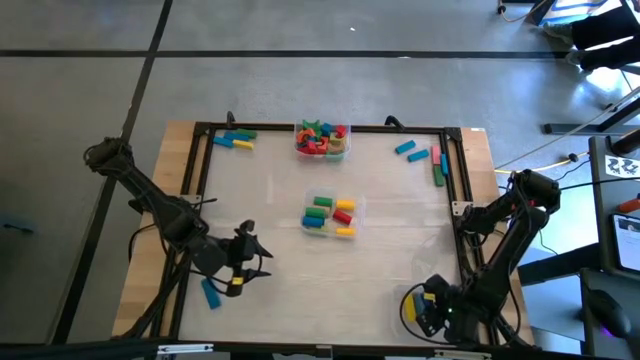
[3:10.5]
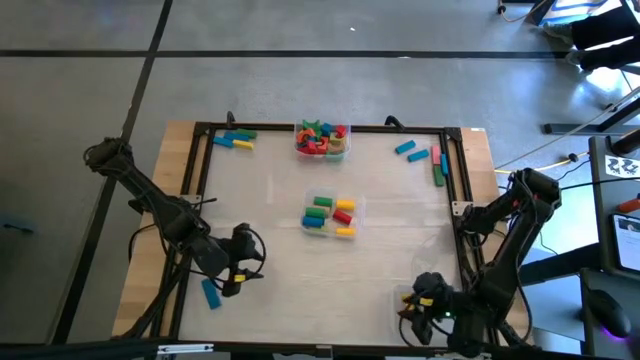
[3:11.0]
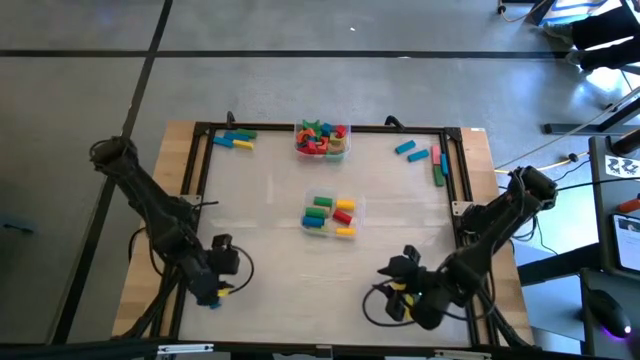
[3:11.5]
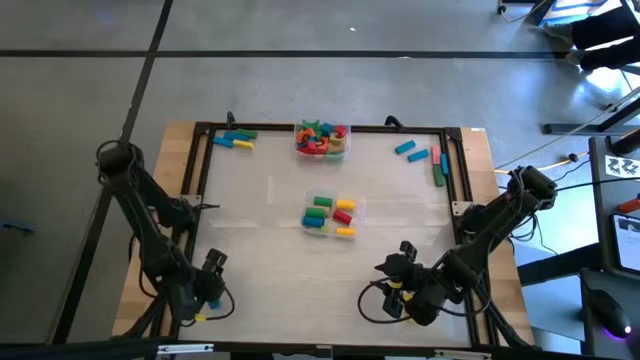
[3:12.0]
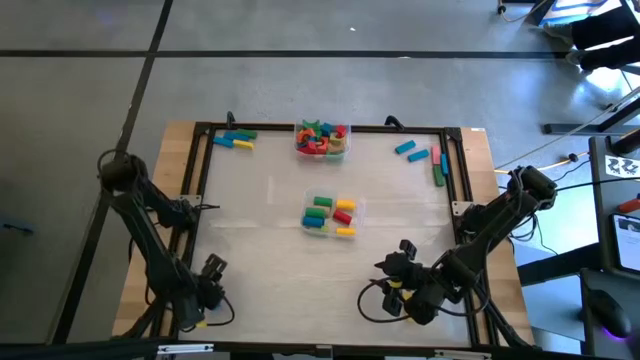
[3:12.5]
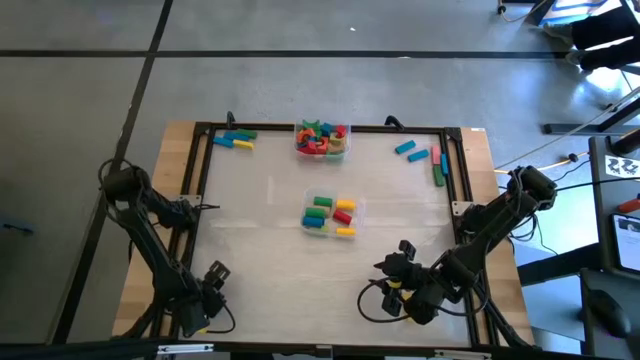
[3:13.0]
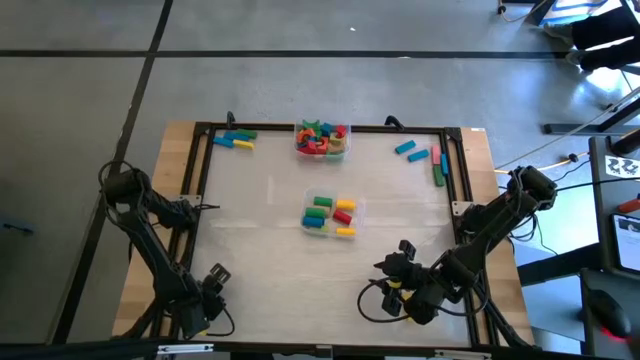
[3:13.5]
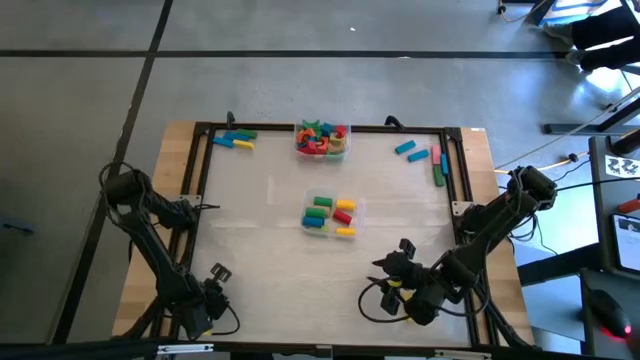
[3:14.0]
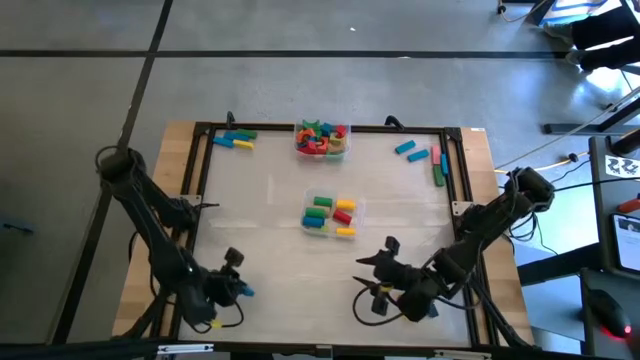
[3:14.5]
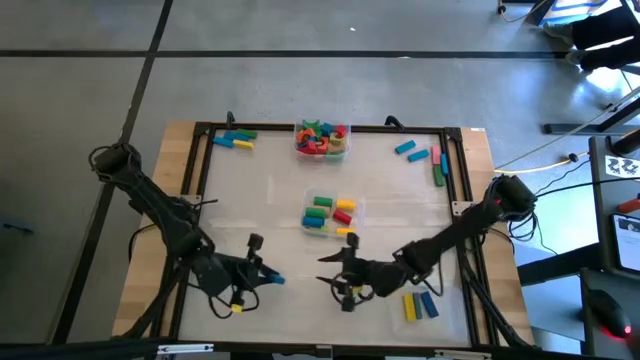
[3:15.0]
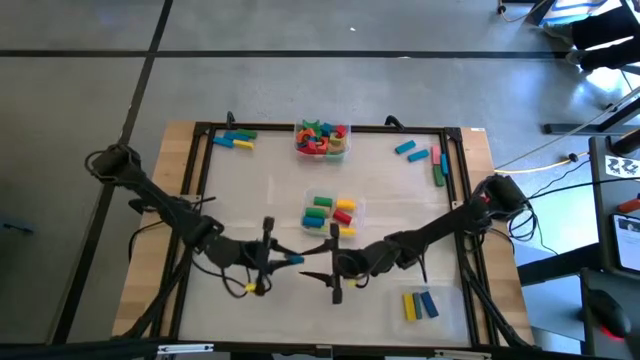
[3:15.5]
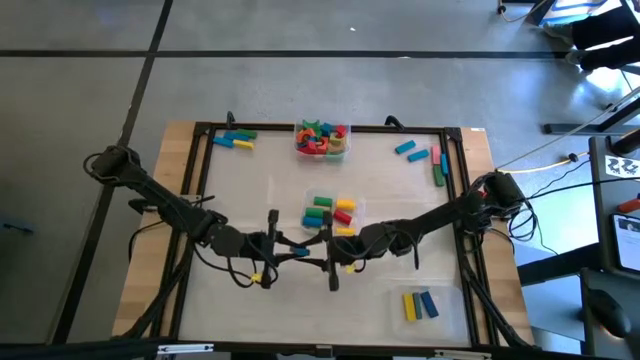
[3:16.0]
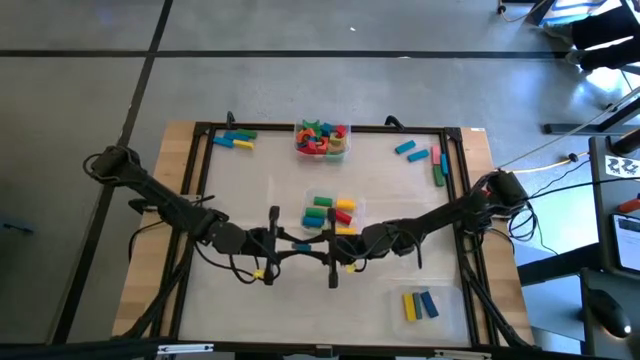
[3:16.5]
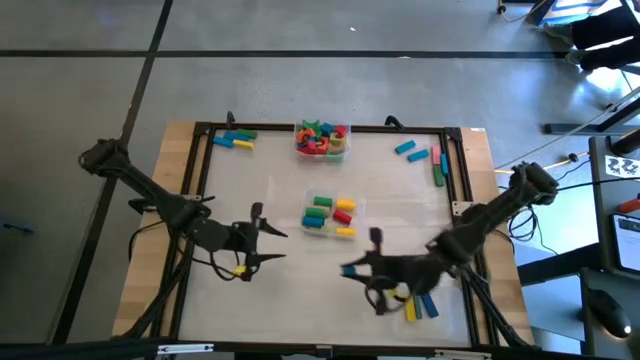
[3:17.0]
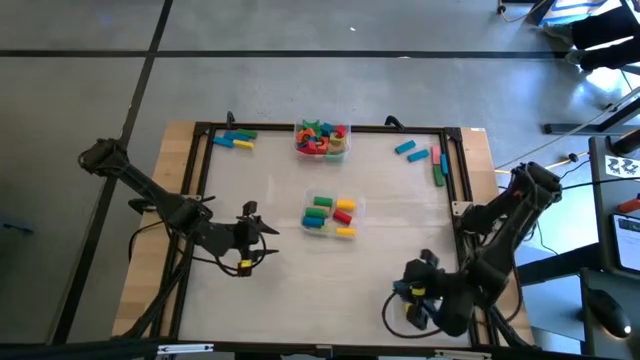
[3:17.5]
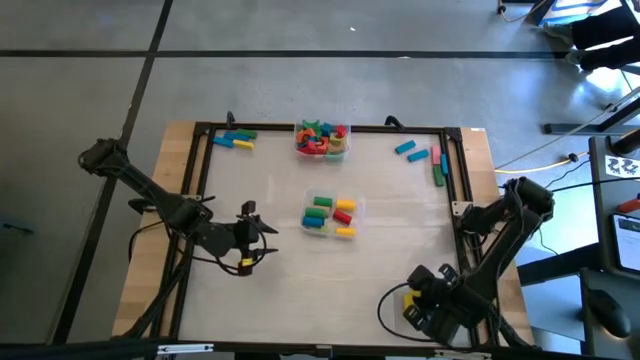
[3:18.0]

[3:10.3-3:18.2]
Task: Sort blocks by size
Put the blue rectangle block into the bottom transparent bin

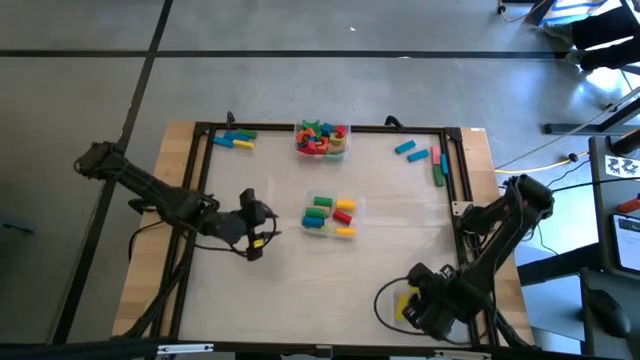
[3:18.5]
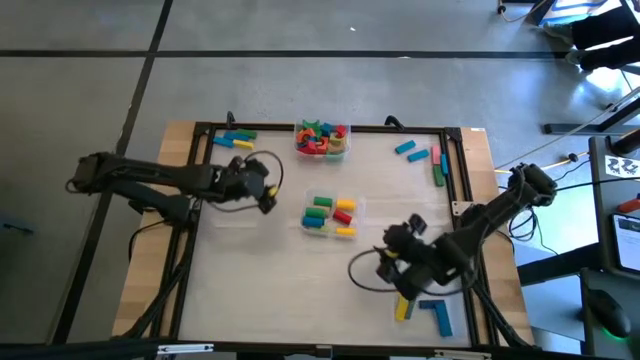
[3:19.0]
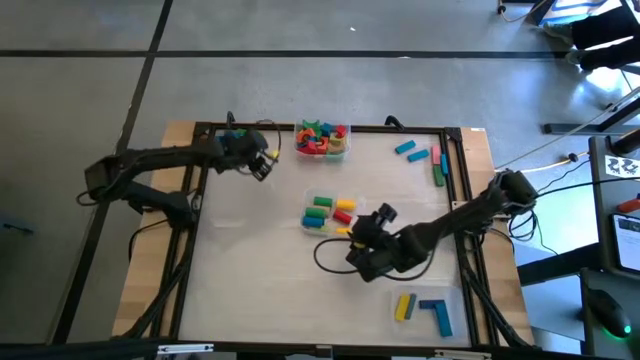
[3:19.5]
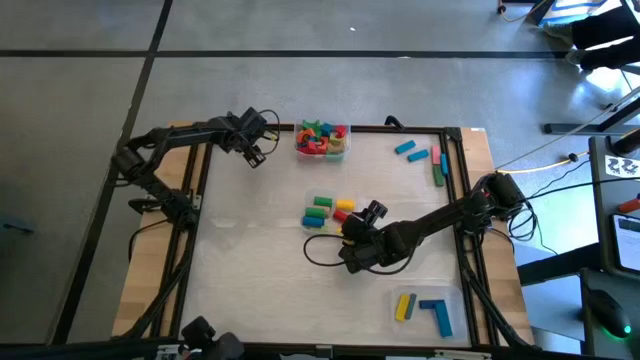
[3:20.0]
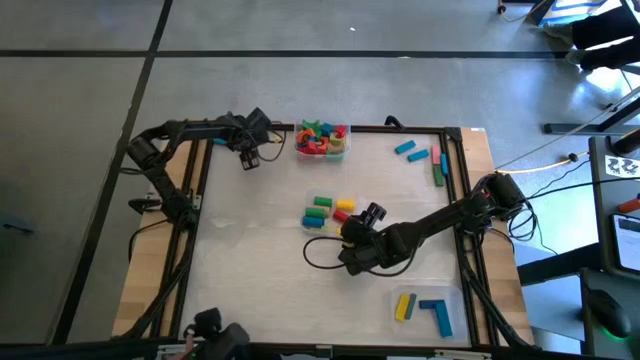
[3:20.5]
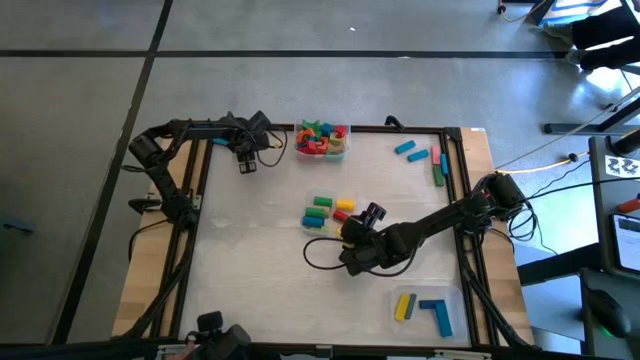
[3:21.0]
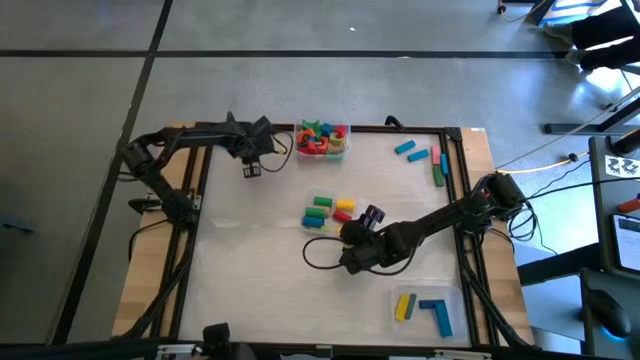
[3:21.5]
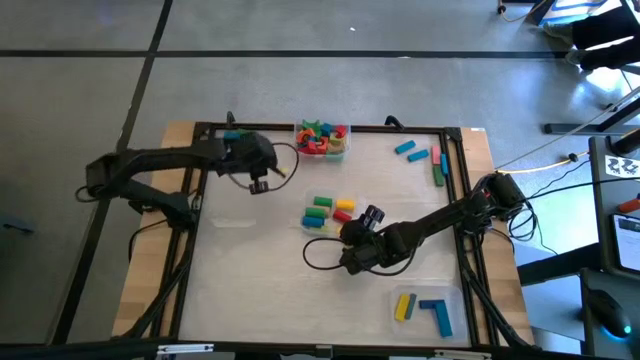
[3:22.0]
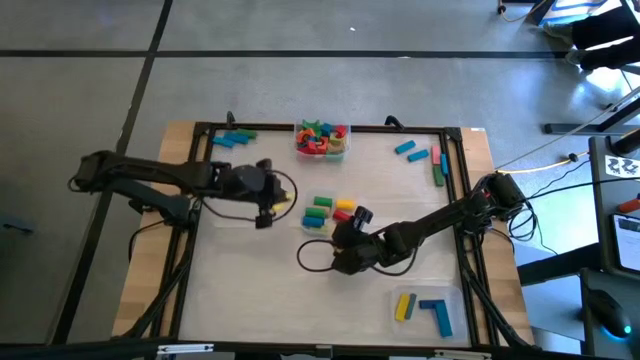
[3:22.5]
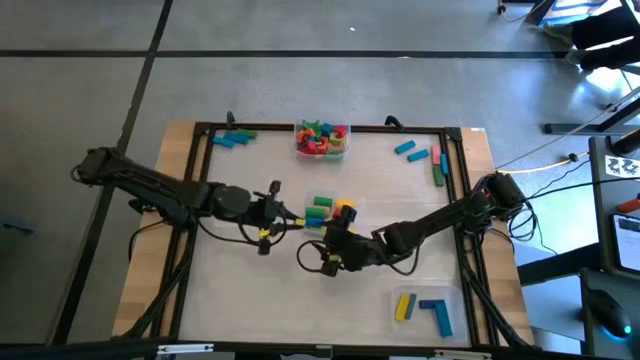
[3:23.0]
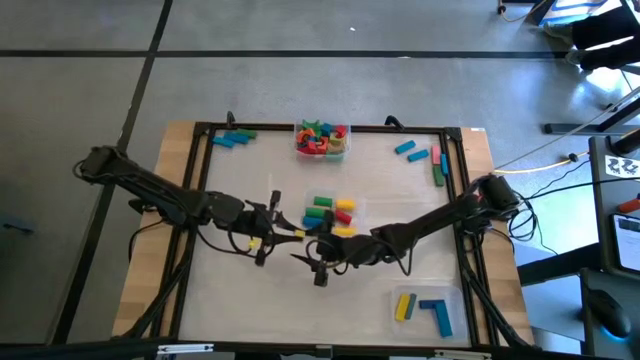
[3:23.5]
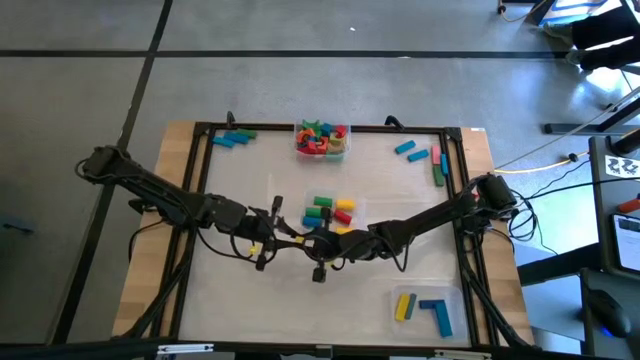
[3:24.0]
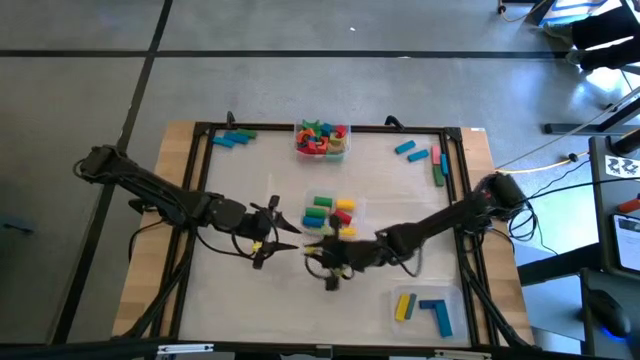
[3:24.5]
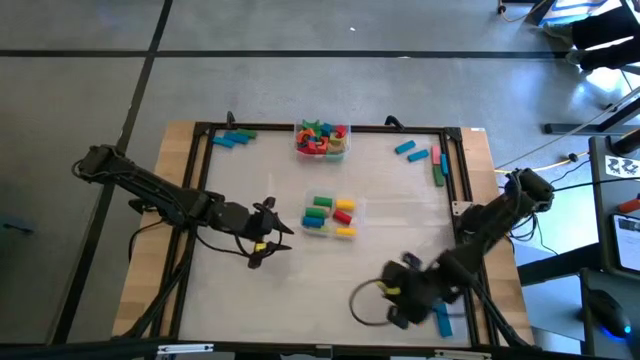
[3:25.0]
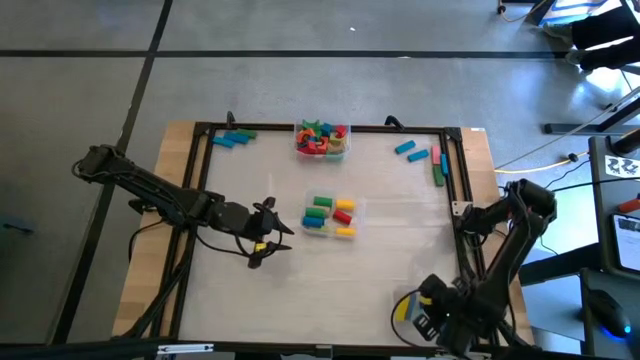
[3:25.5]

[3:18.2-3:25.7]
Put the yellow rectangle block into the bottom transparent bin

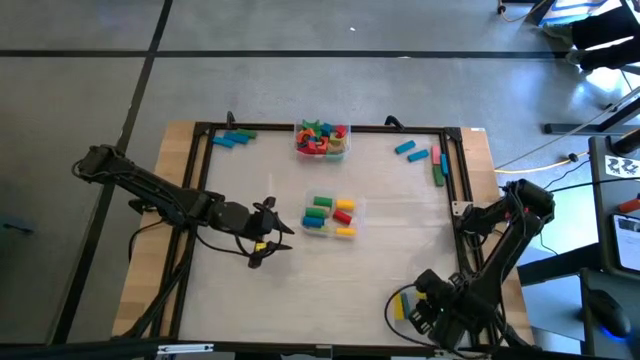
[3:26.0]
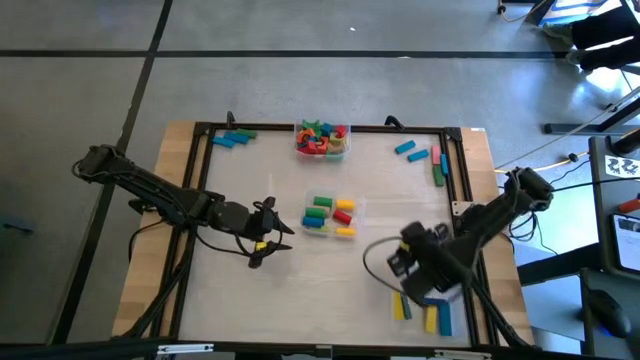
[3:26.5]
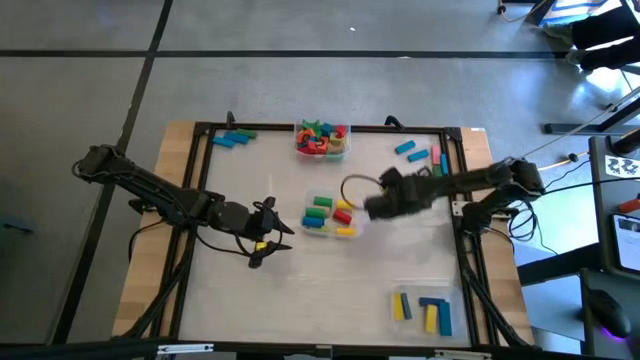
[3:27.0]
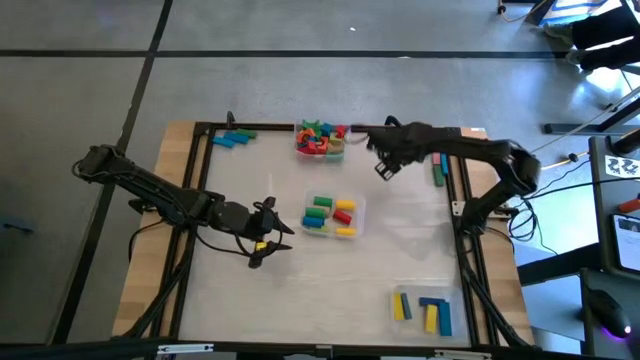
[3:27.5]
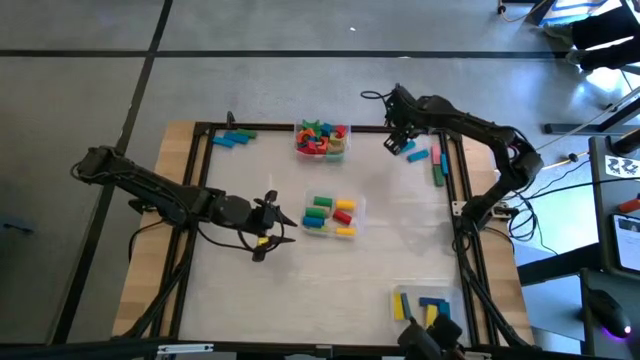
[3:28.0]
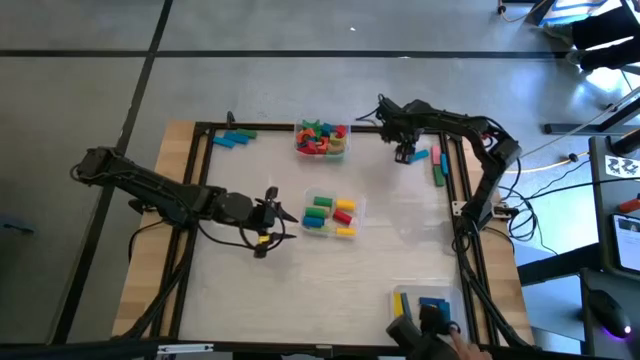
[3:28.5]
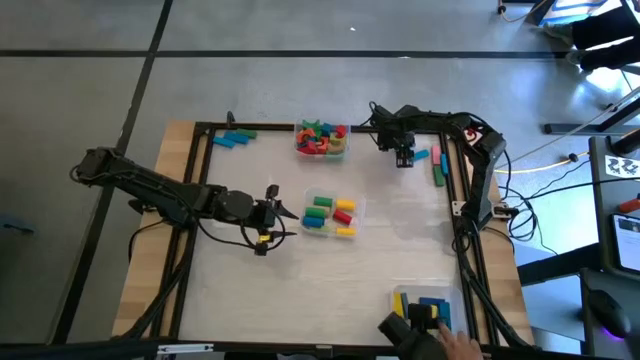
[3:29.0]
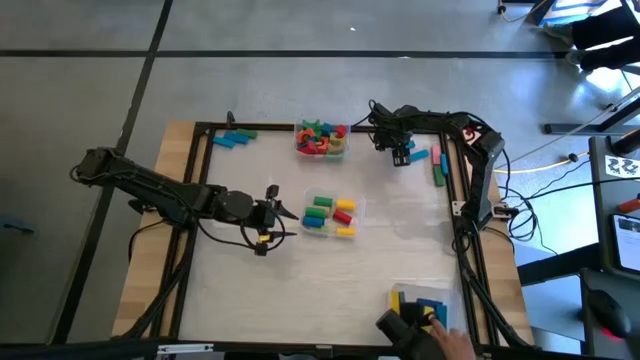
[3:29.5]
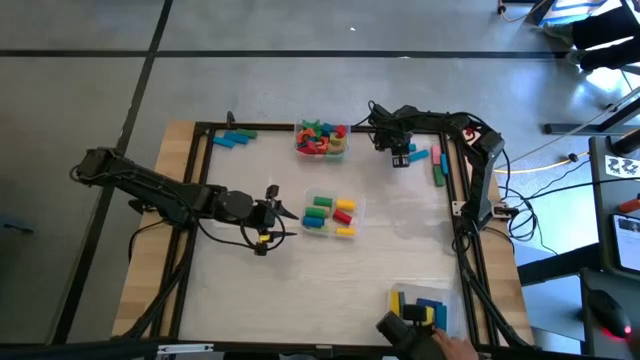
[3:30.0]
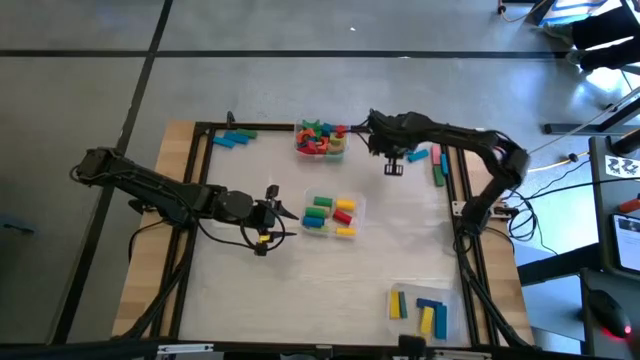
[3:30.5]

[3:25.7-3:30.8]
Put the blue rectangle block into the bottom transparent bin
